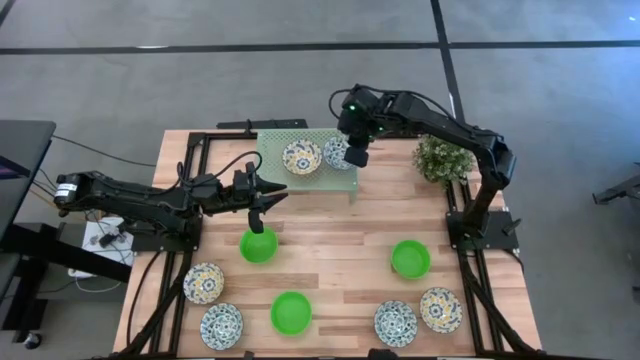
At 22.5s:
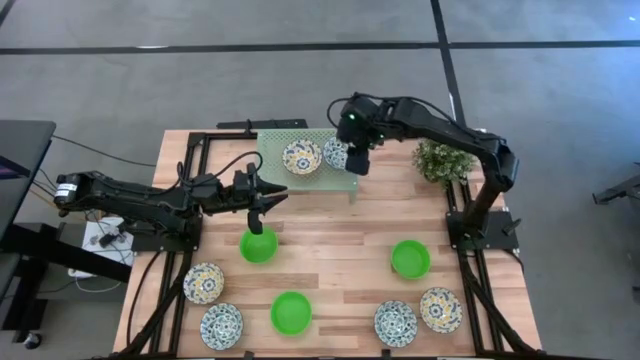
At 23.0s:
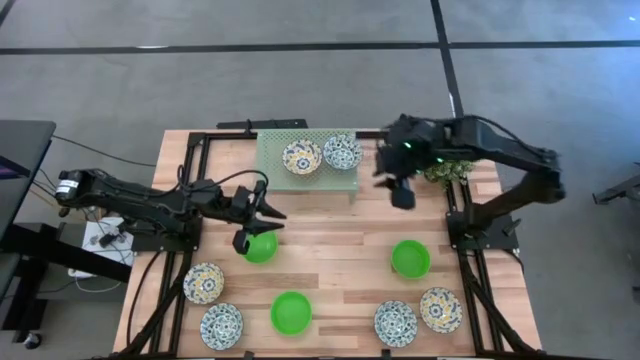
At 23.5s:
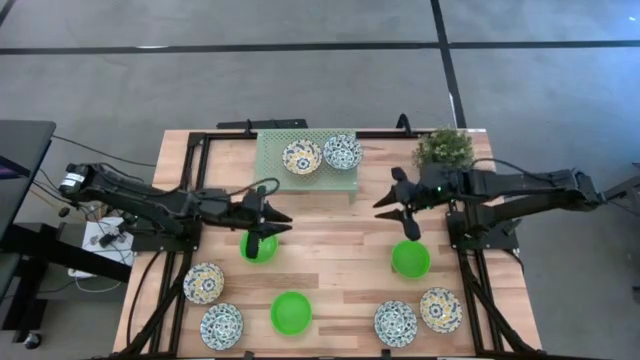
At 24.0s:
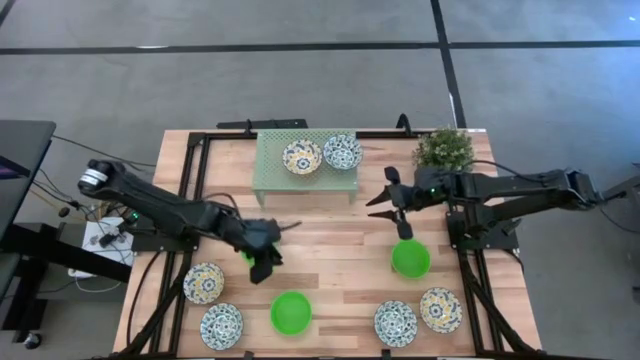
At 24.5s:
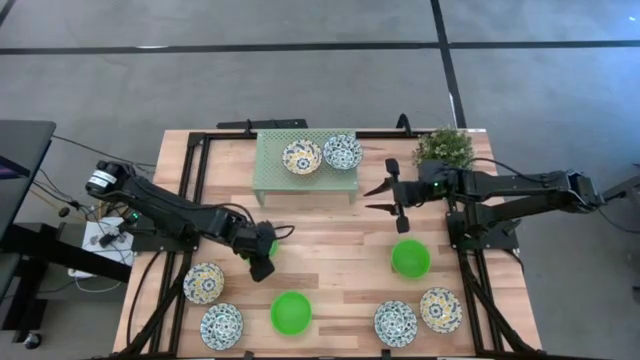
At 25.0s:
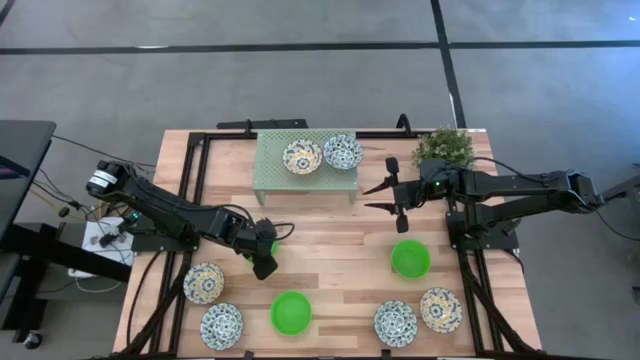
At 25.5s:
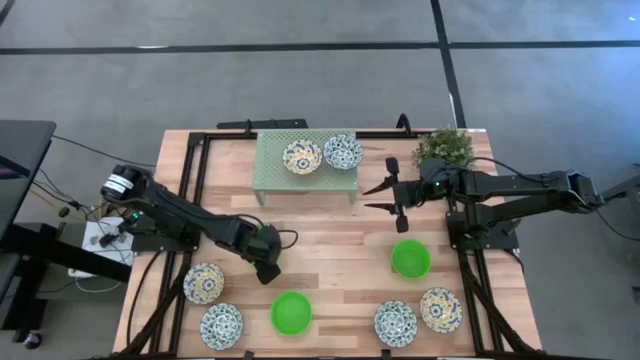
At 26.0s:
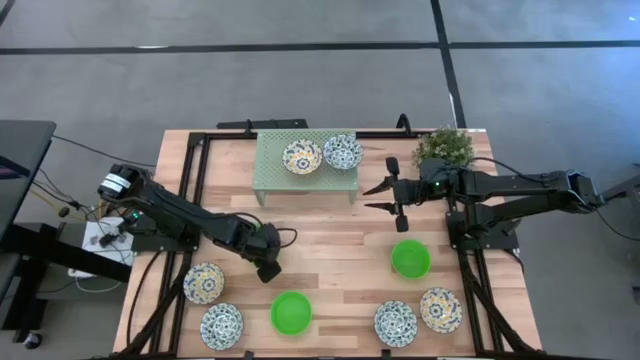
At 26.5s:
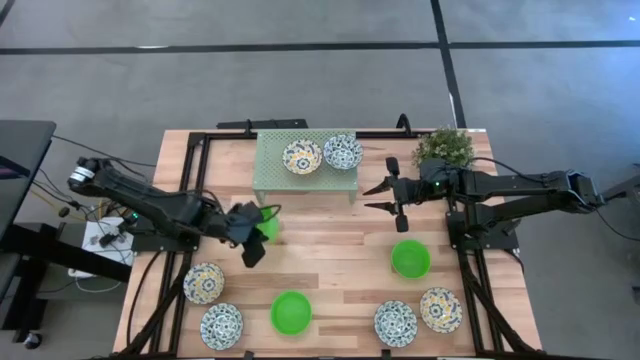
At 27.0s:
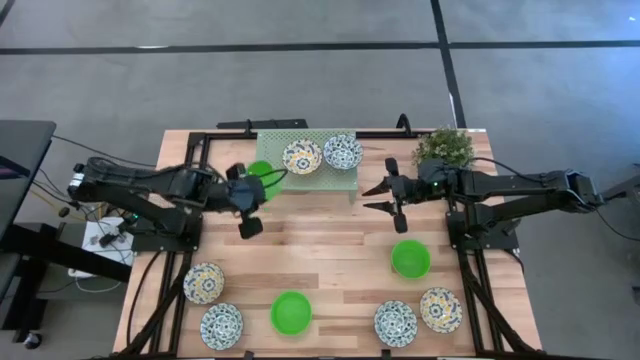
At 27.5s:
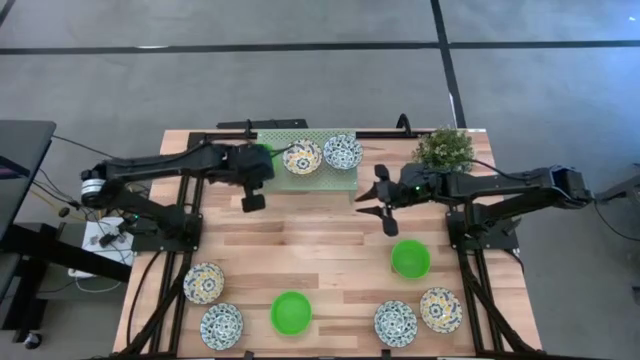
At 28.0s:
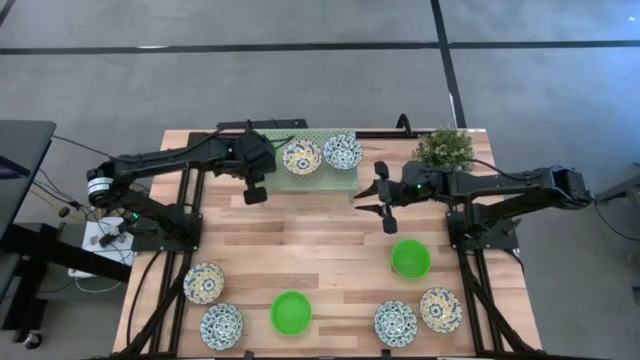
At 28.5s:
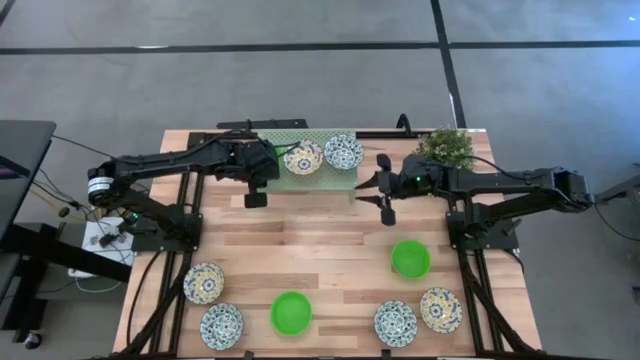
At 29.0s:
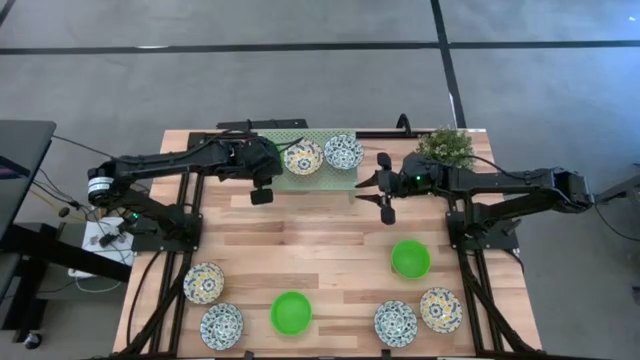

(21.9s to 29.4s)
Task: Pick & Place Mini bowls
Put the top left green bowl on the shelf

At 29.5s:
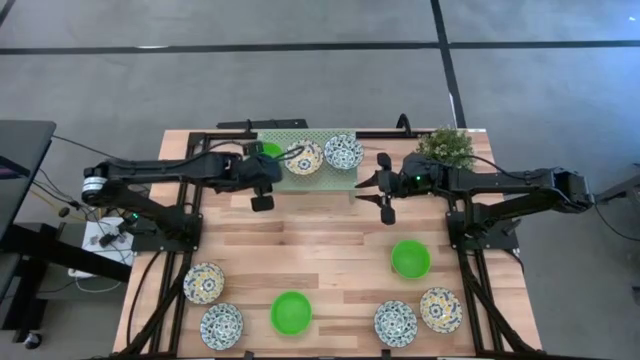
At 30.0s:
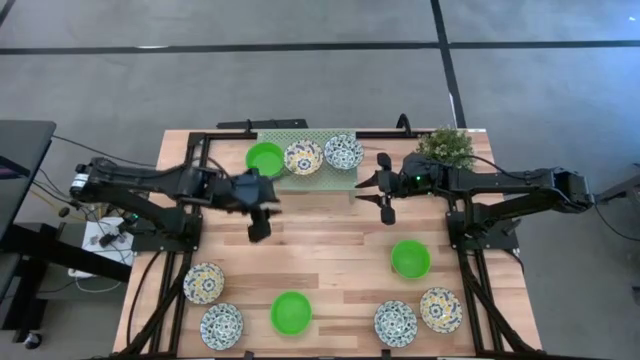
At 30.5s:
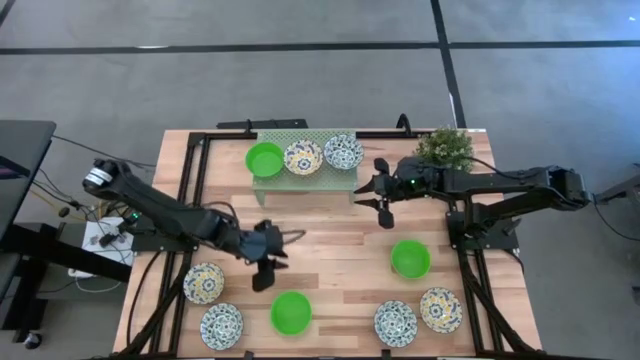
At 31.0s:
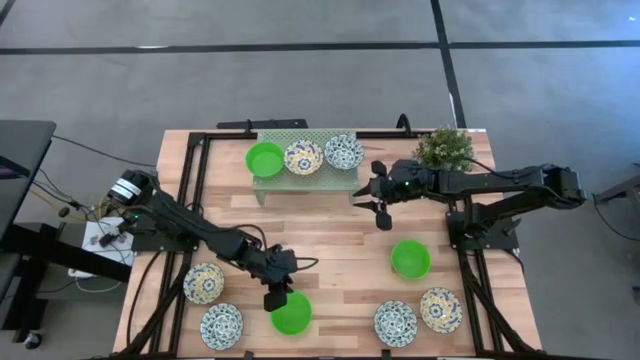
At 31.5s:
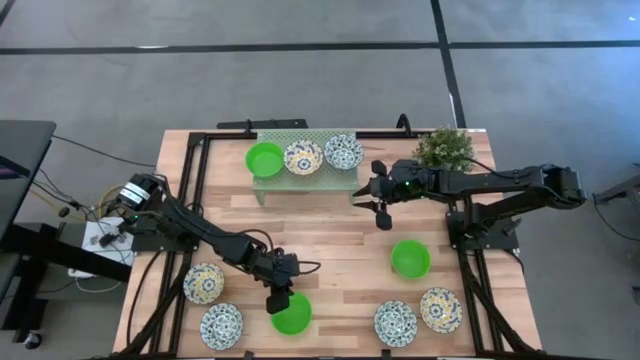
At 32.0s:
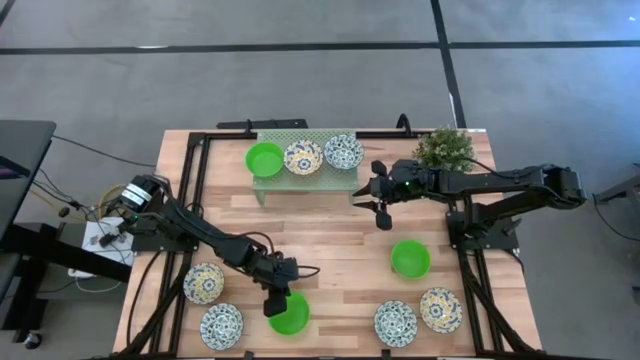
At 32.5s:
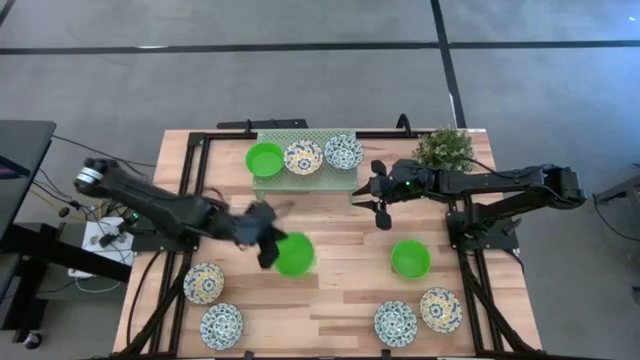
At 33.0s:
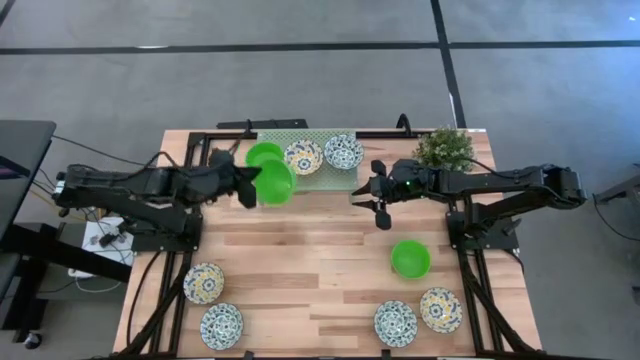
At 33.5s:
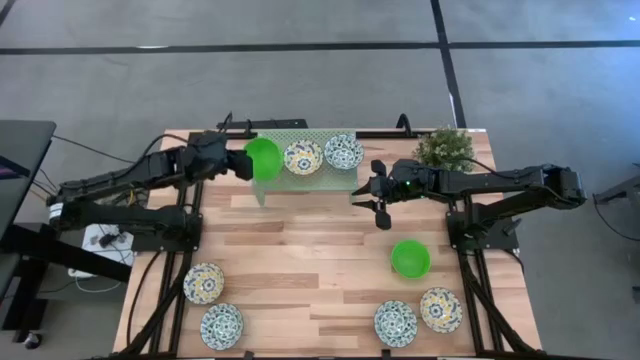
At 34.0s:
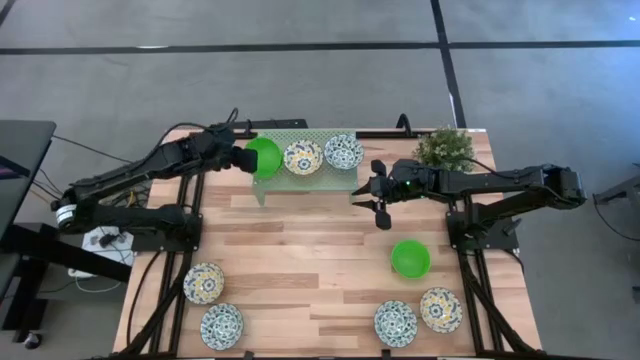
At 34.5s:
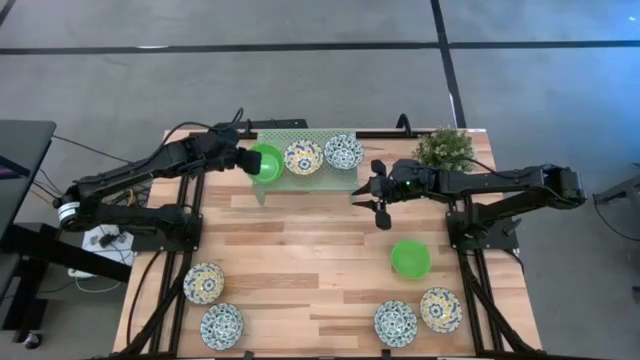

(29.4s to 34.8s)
Stack the bottom green bowl on the green bowl on the shelf

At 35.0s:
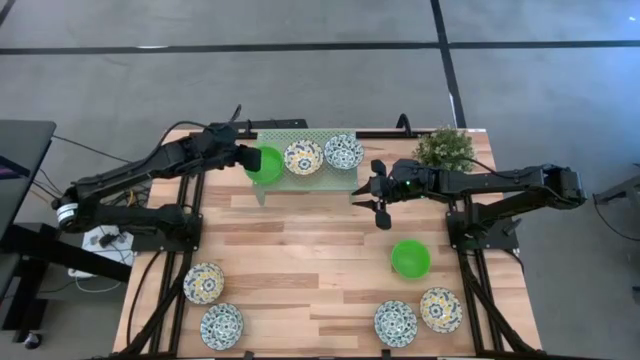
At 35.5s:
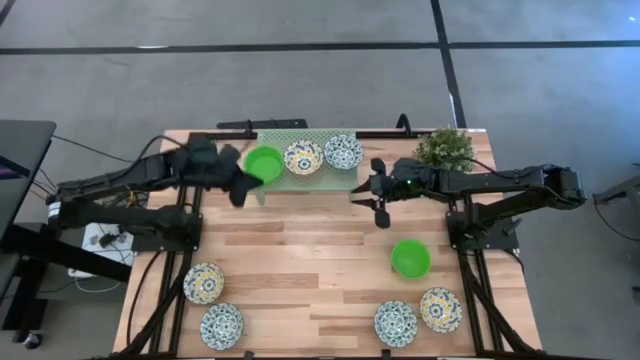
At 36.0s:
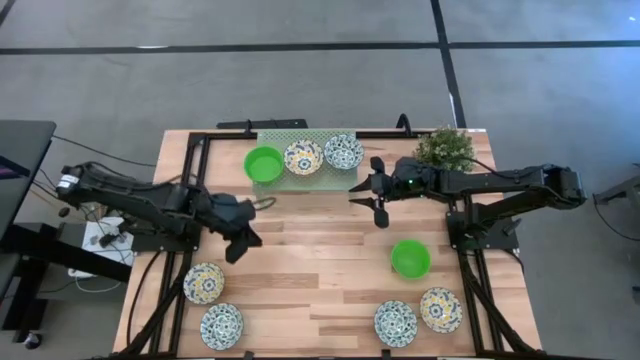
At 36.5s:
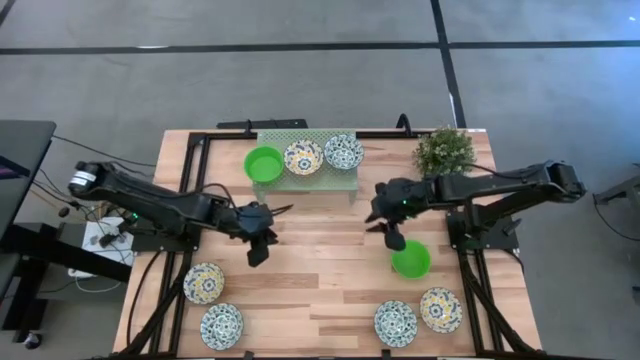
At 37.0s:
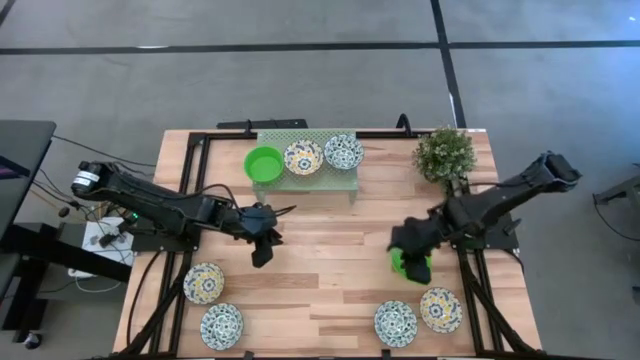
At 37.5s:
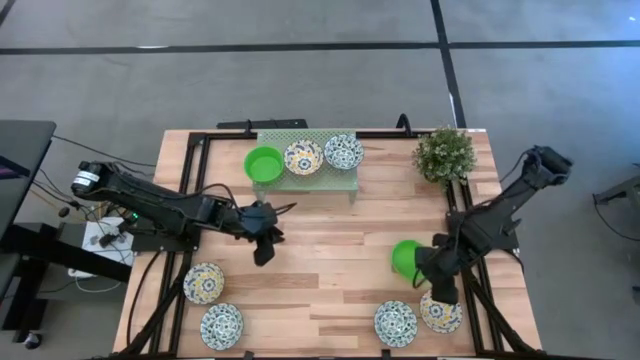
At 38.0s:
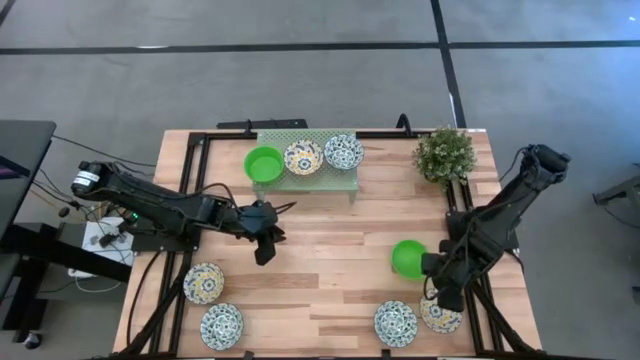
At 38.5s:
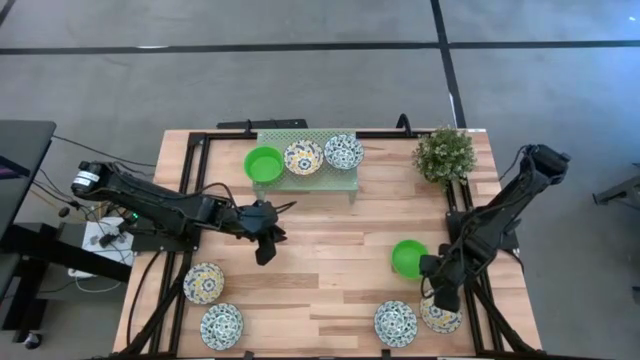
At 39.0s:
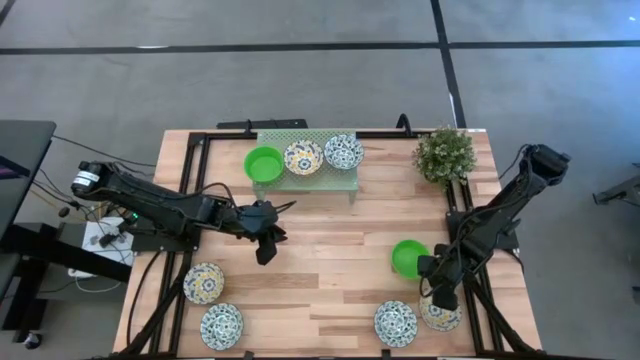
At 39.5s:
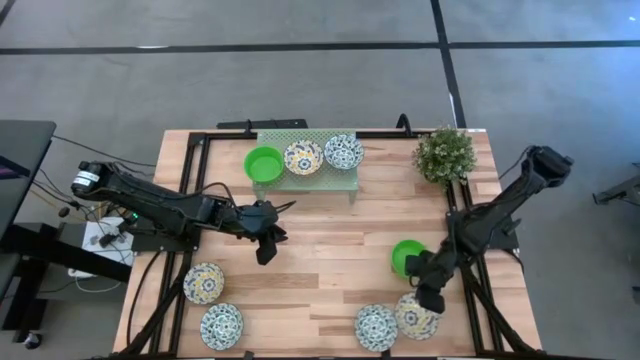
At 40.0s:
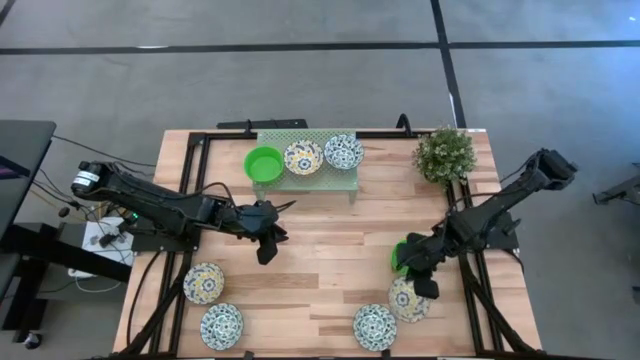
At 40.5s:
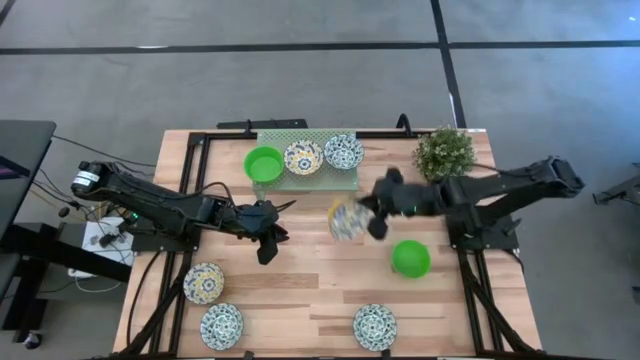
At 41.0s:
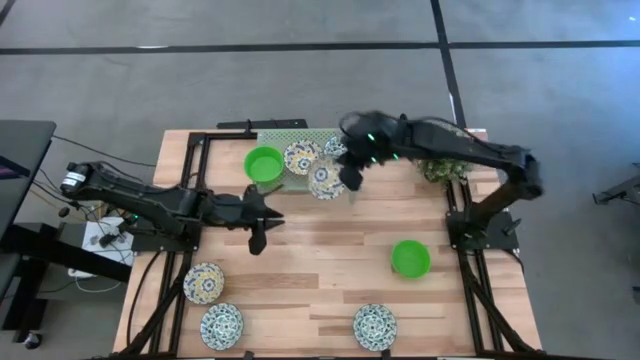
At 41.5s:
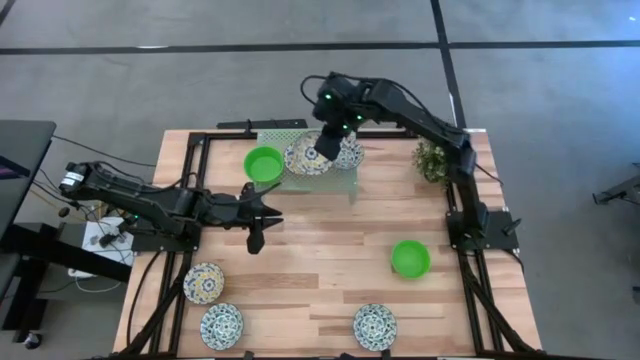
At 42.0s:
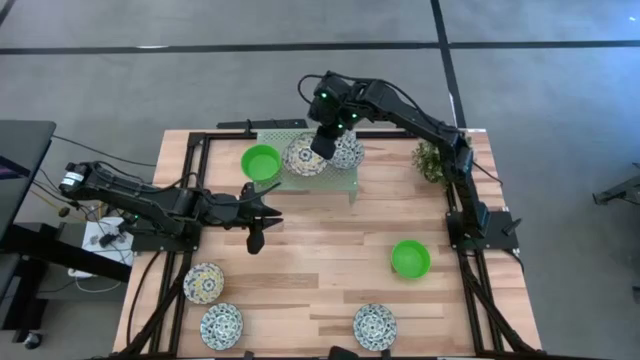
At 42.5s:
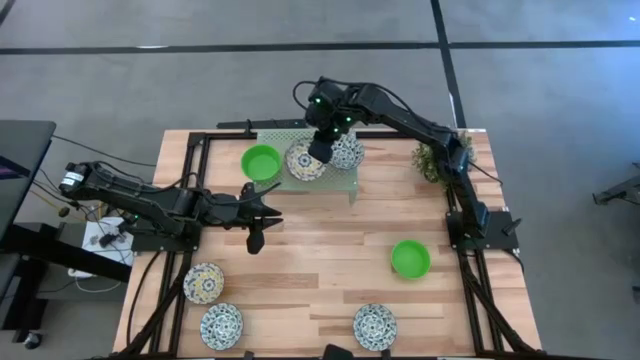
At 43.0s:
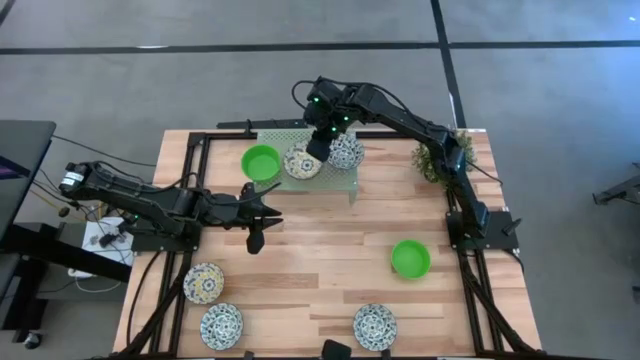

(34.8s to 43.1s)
Stack the right yellow patterned bowl on the yellow patterned bowl on the shelf

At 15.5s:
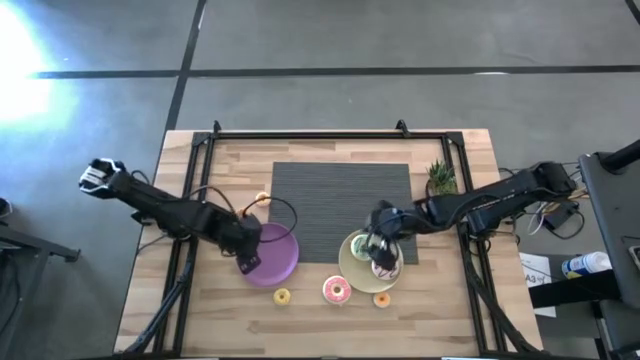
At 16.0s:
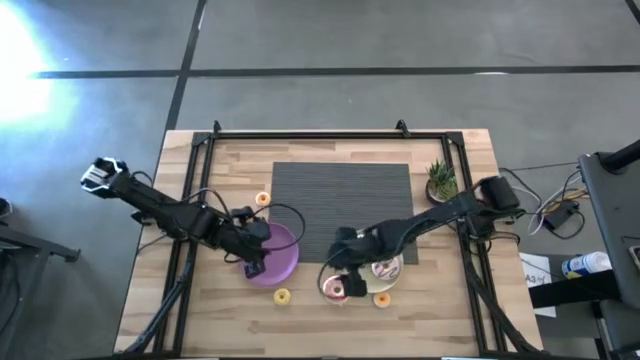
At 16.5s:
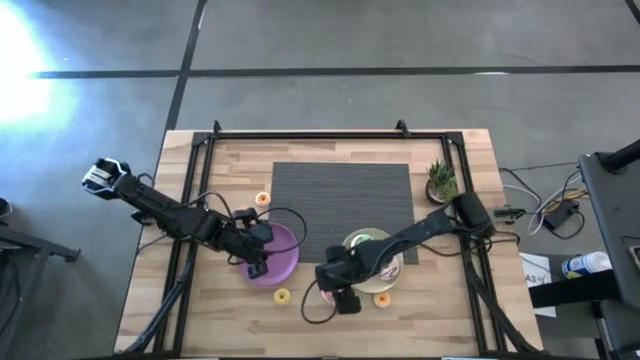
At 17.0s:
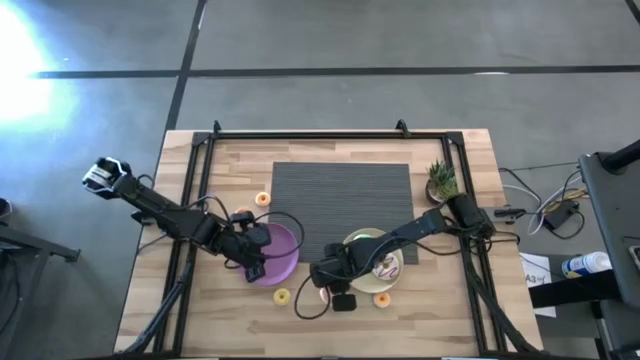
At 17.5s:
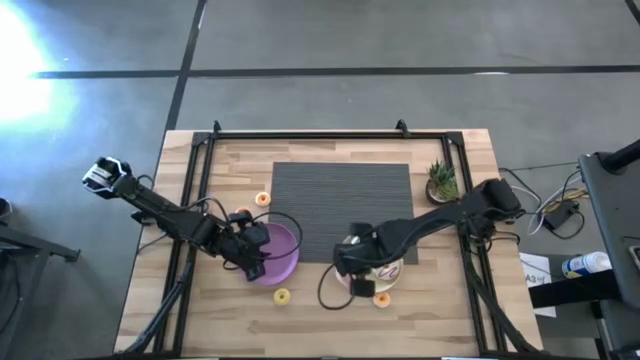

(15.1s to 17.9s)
Task: Pick & Place donuts
Put the large pink donut on the brown plate
